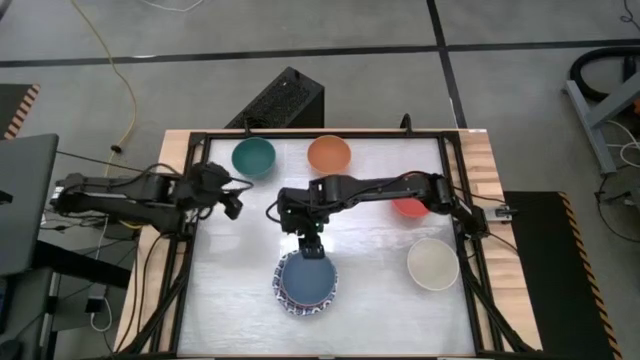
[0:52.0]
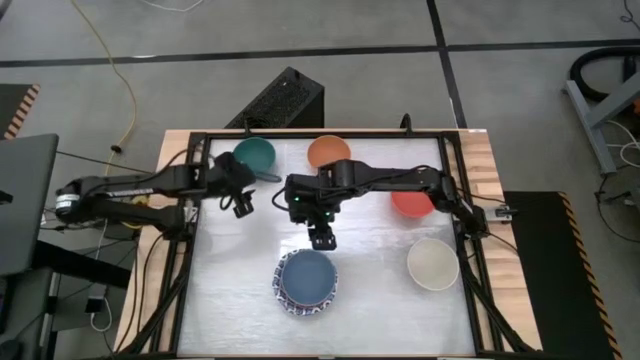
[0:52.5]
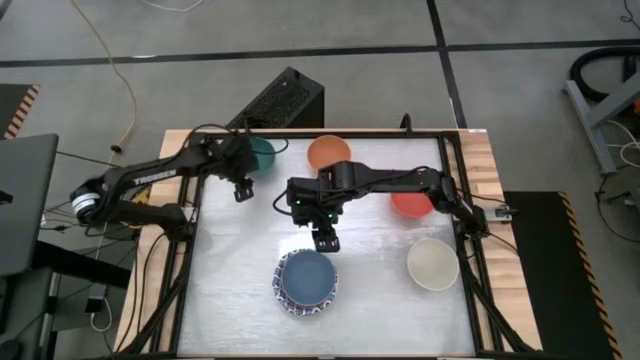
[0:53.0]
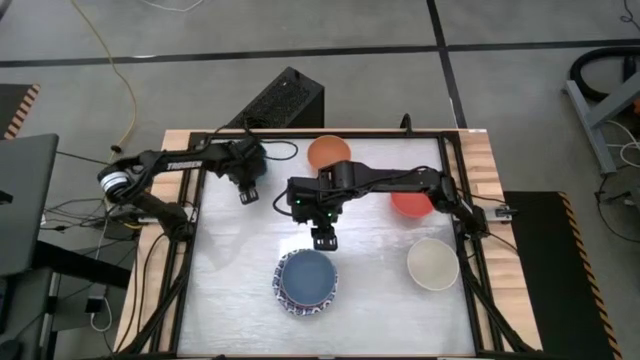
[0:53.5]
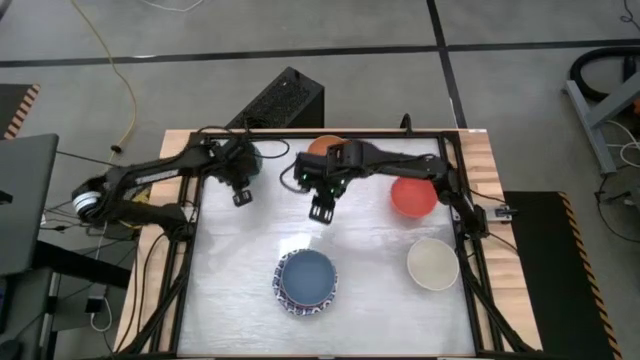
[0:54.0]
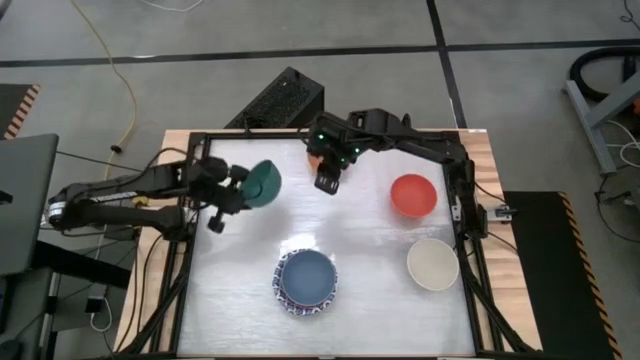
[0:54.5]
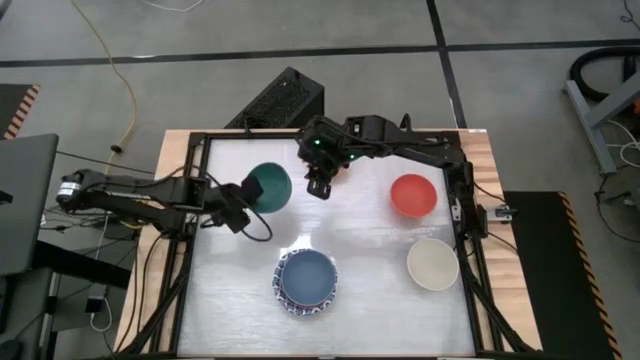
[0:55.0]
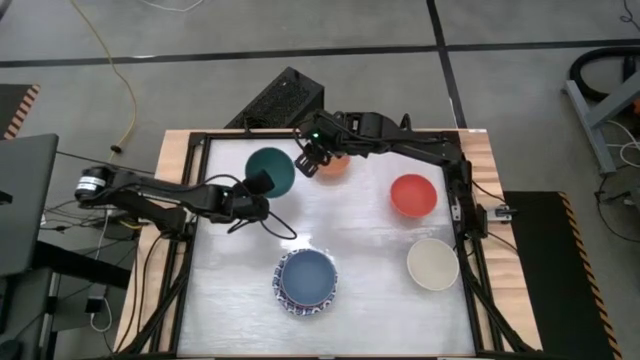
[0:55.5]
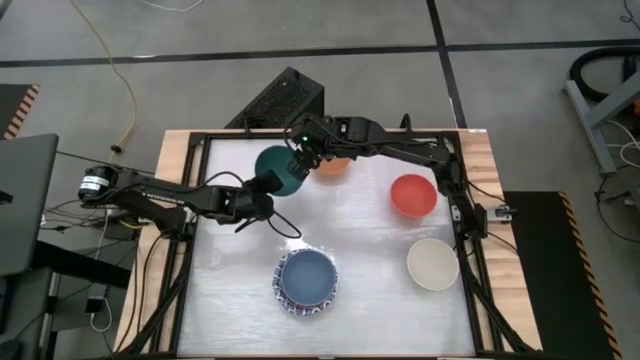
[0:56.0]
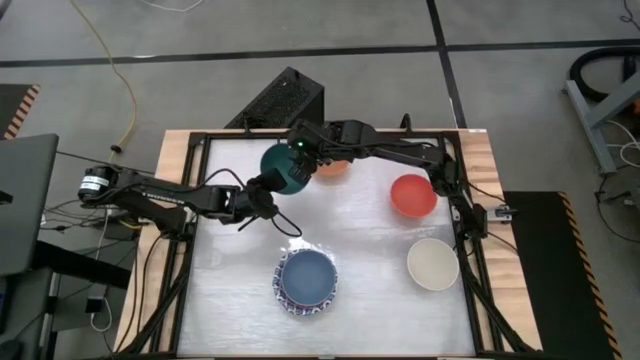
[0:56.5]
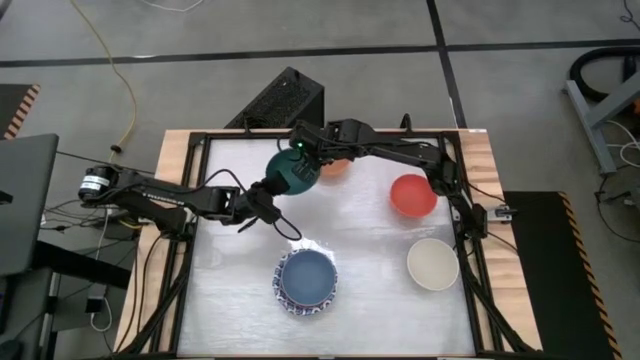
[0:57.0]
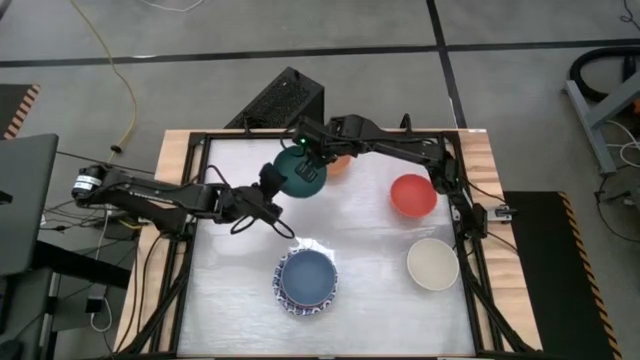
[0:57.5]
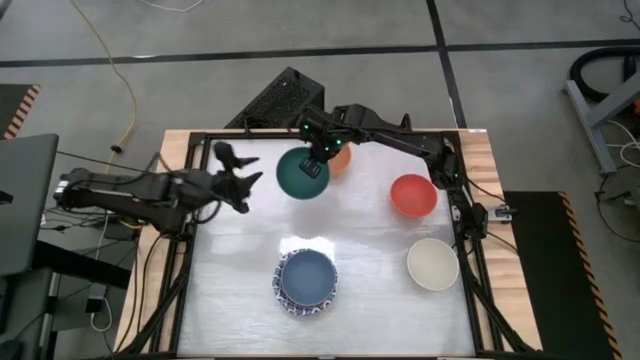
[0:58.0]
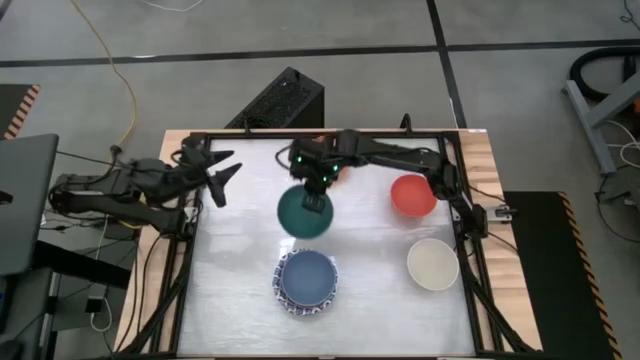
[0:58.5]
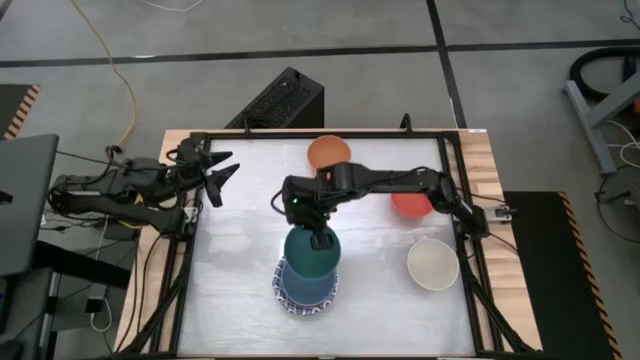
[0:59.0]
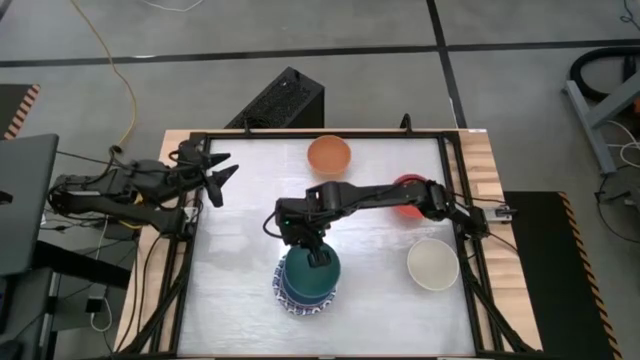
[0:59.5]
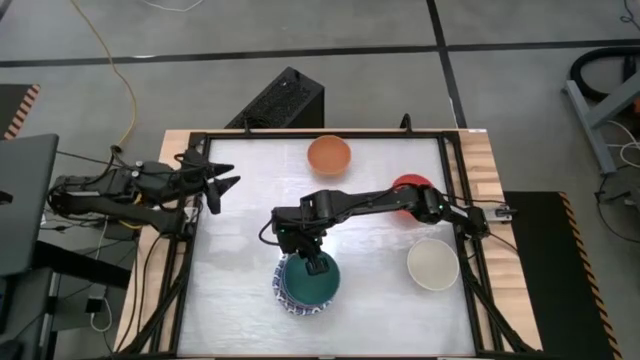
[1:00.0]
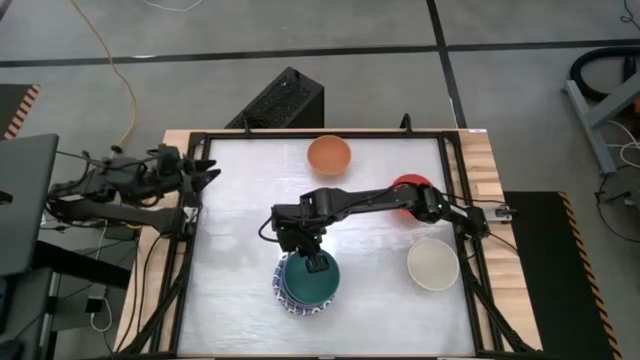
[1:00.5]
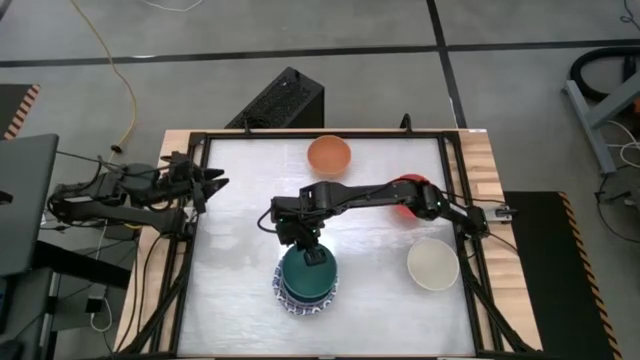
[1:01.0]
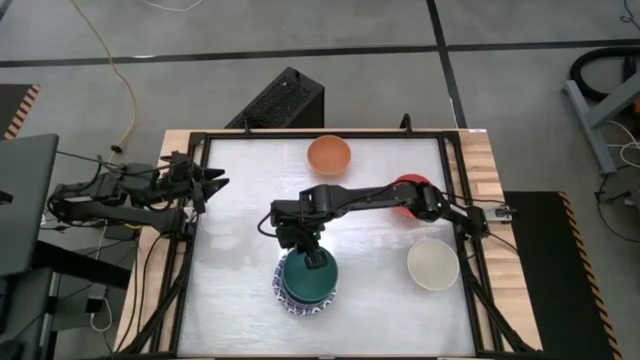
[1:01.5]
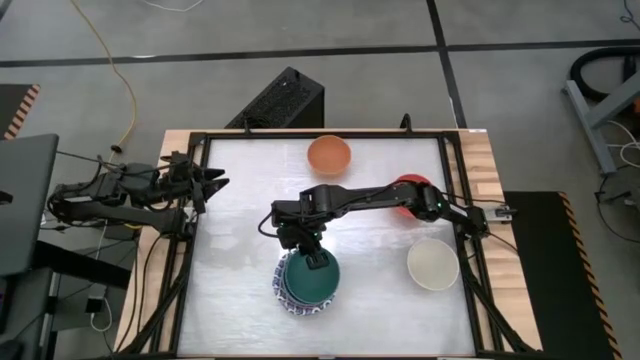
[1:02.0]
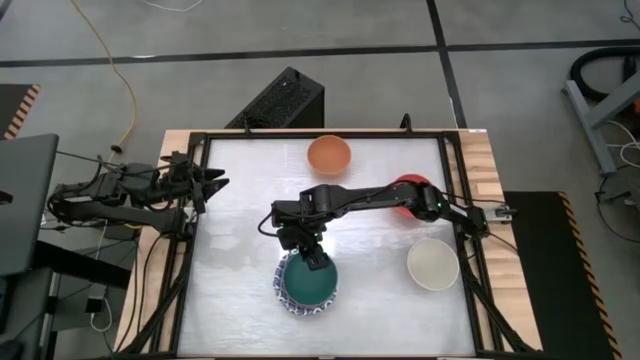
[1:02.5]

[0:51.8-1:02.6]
Stack the green bowl into the blue bowl

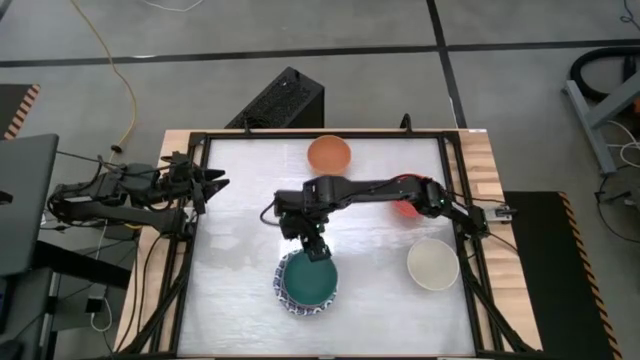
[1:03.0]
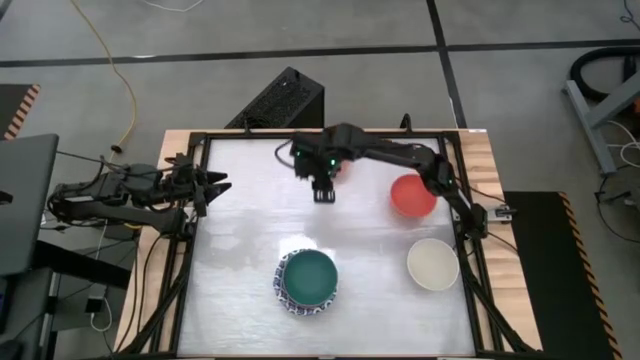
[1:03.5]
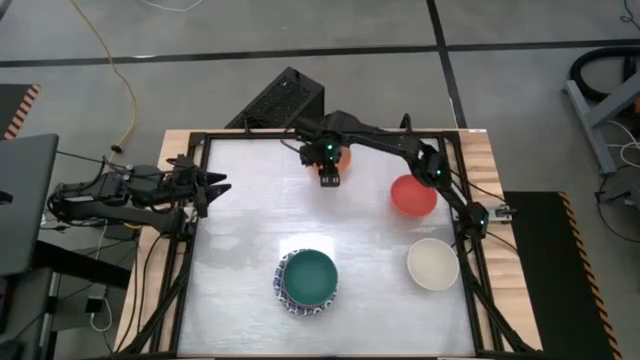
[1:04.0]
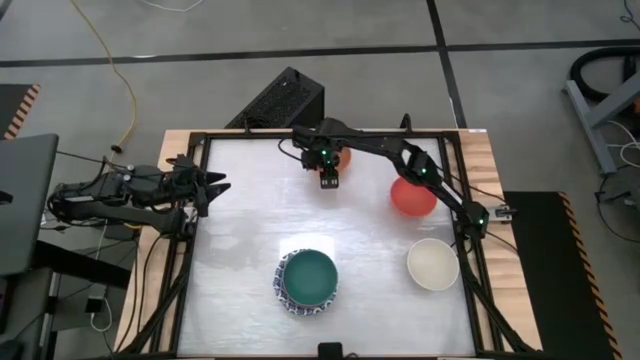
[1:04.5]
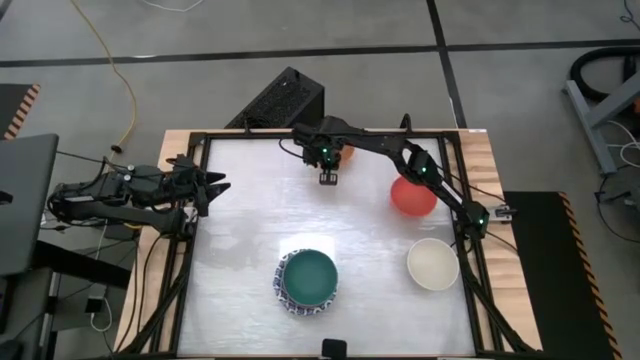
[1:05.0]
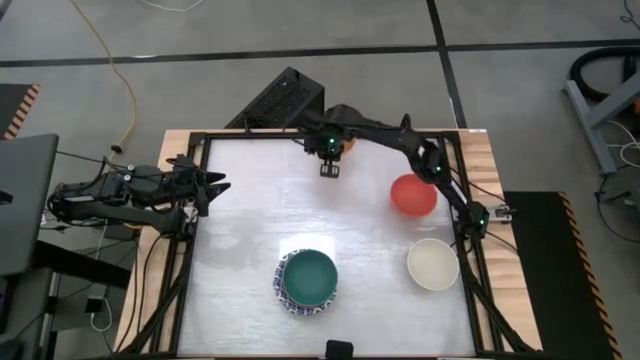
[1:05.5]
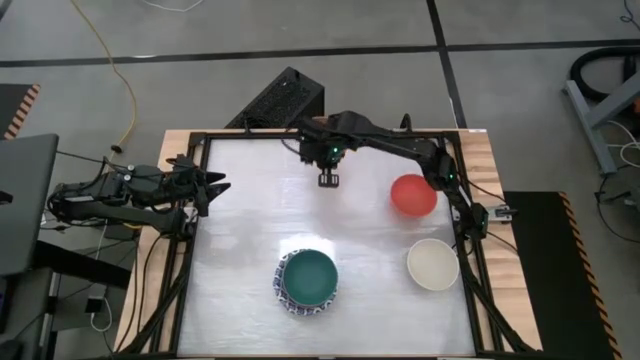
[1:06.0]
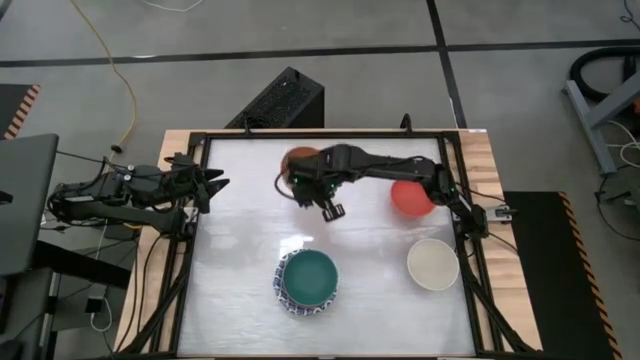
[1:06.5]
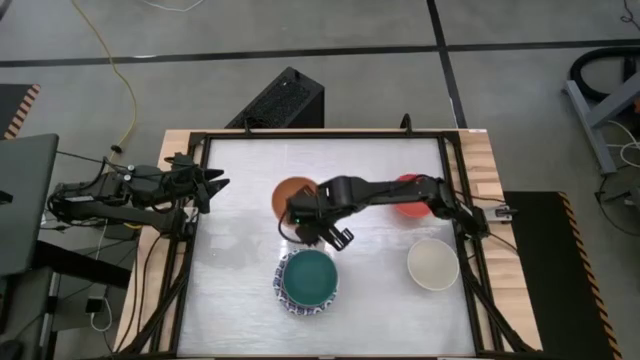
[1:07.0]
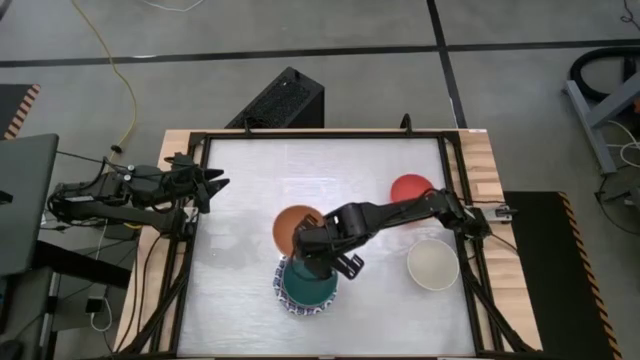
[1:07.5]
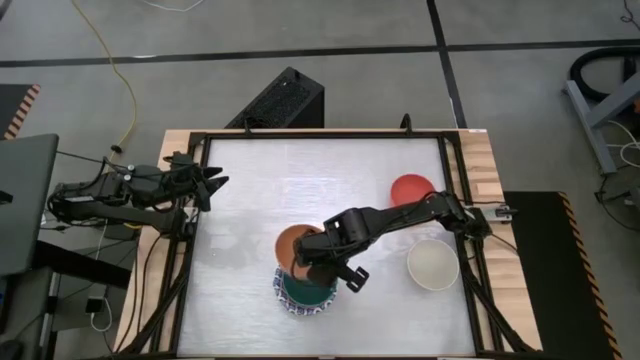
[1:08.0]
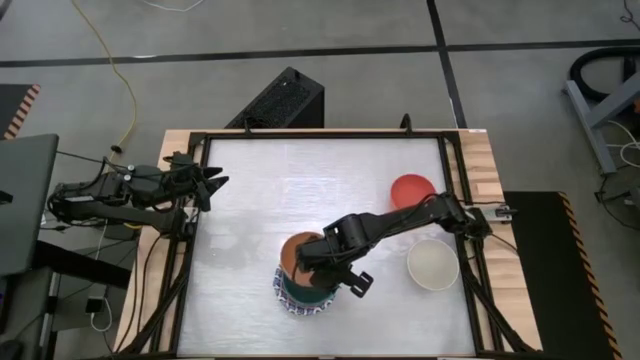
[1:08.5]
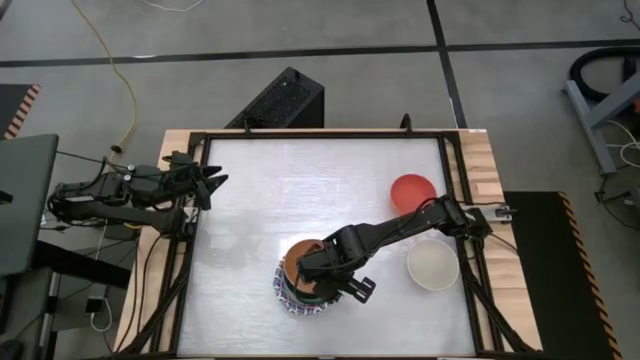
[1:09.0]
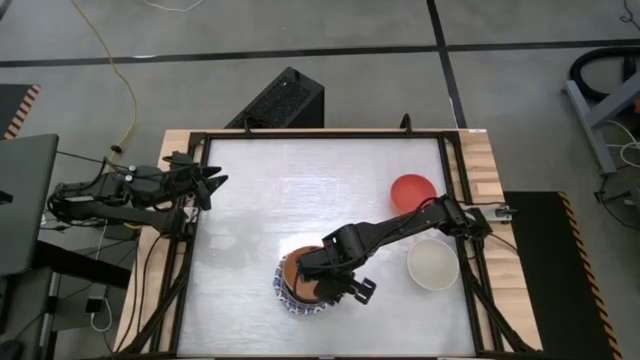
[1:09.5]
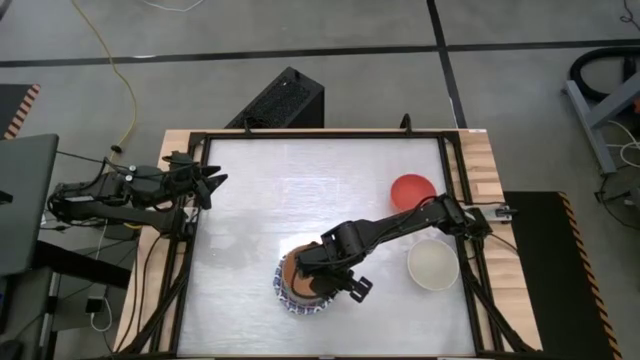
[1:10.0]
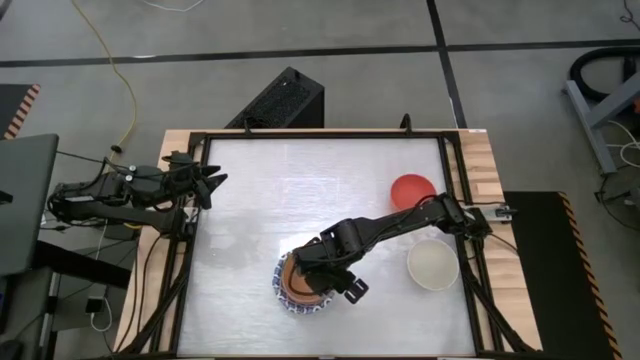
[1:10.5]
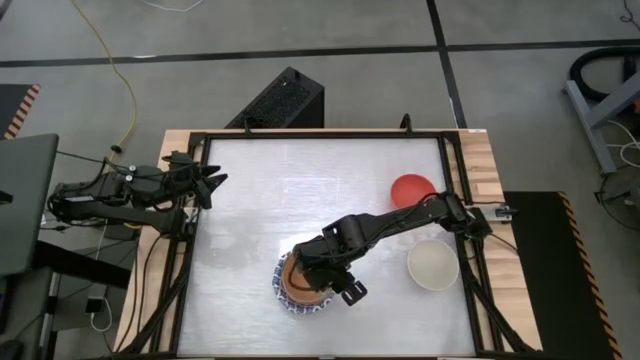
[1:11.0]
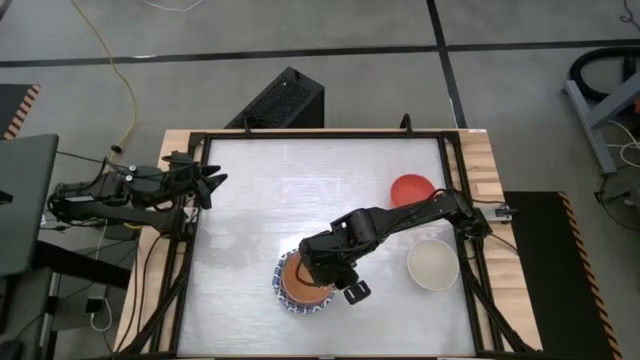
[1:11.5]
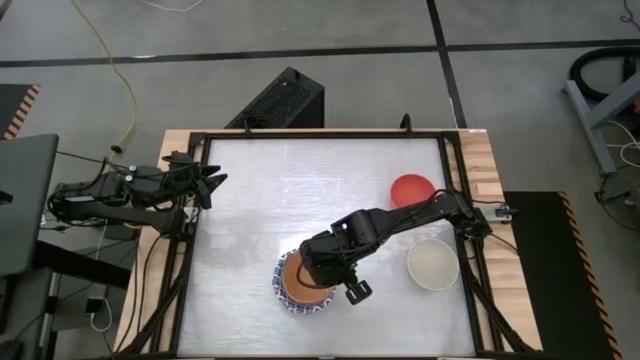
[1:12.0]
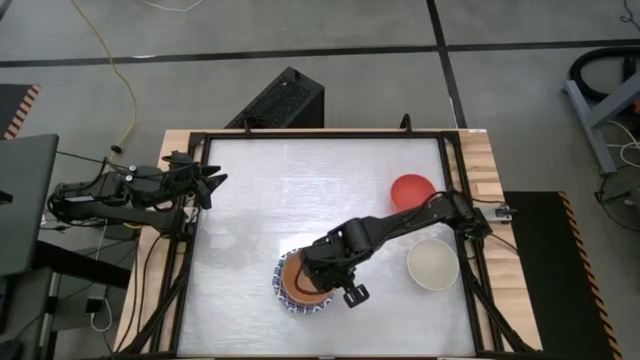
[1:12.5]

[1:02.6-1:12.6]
Stack the yellow bowl into the green bowl
